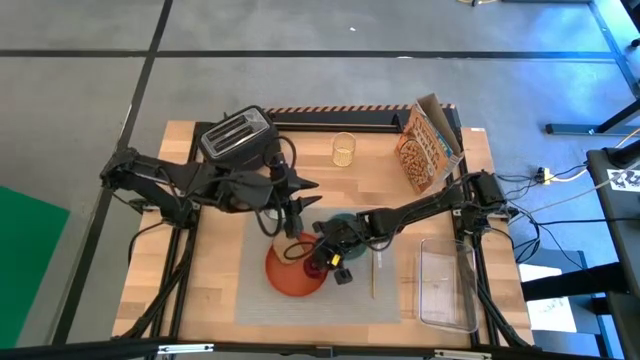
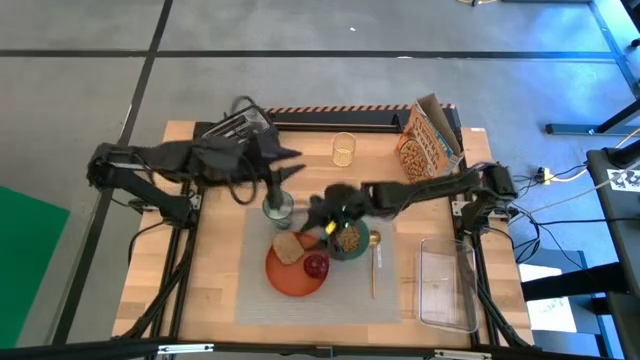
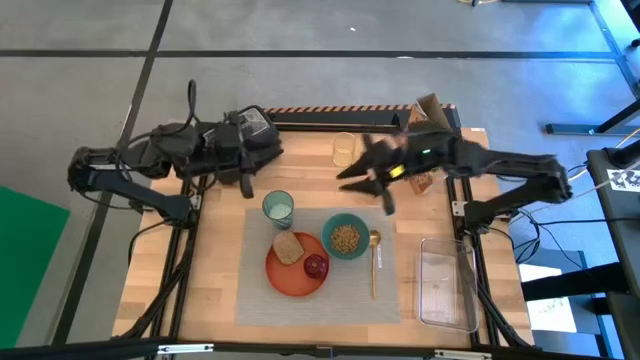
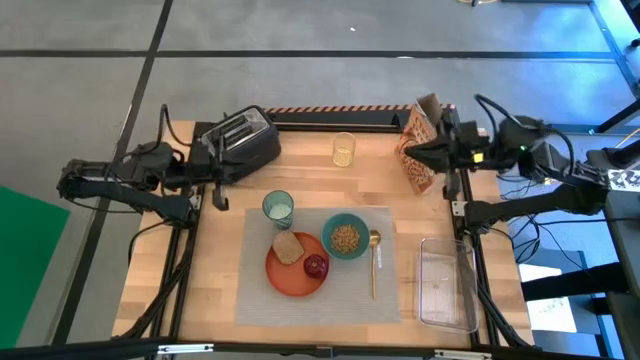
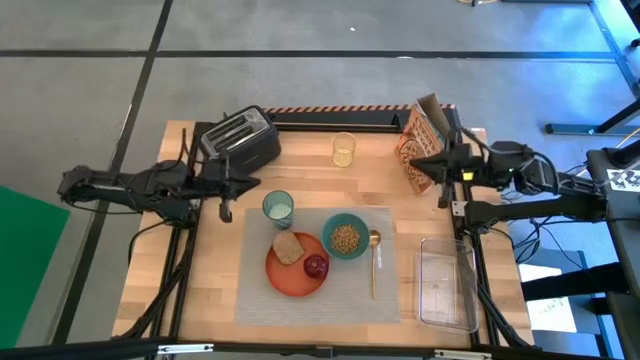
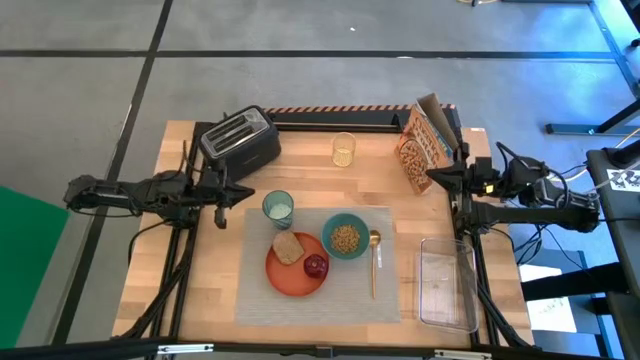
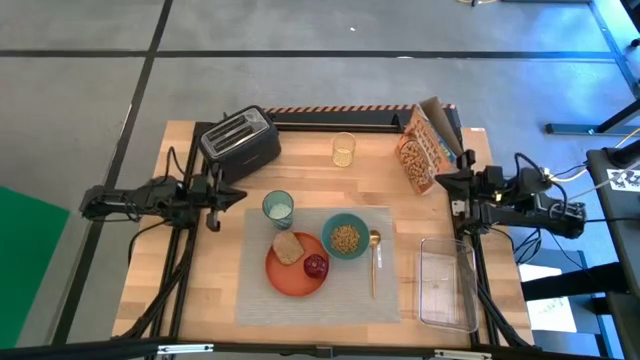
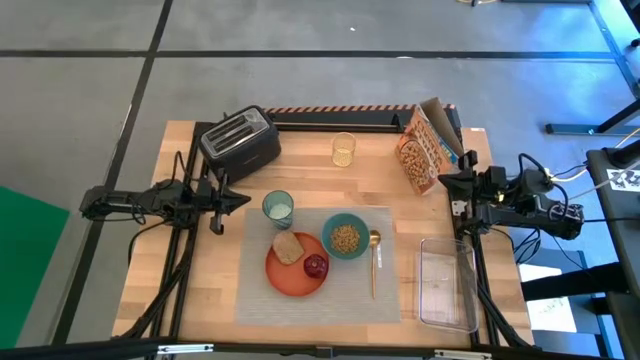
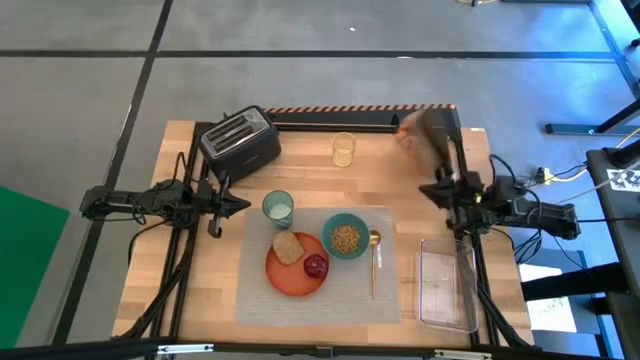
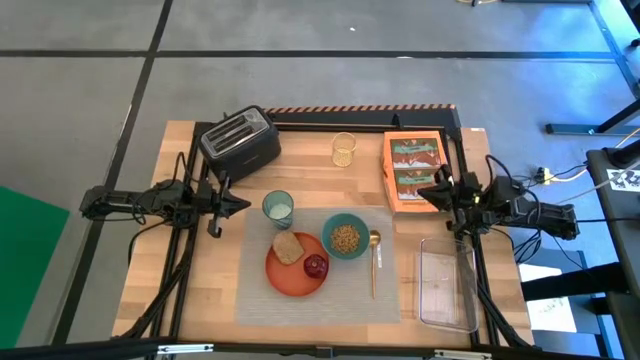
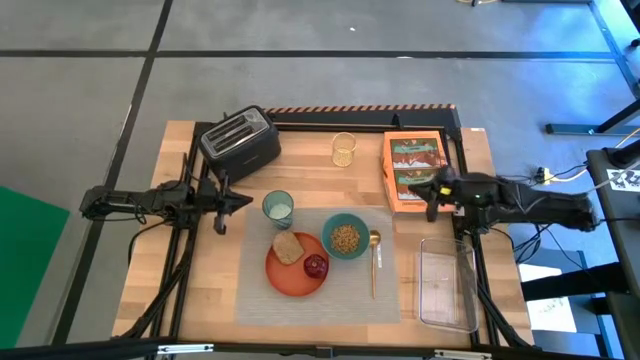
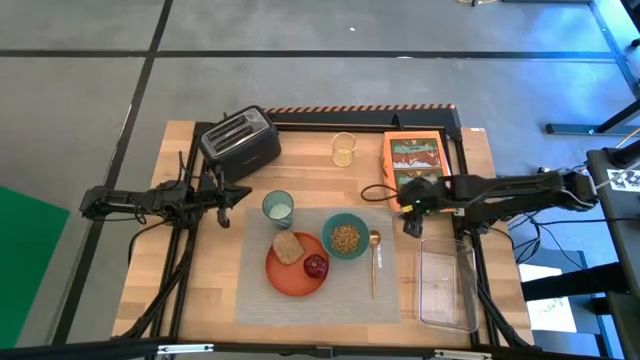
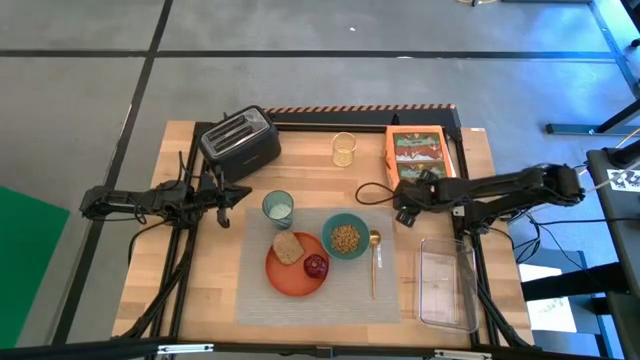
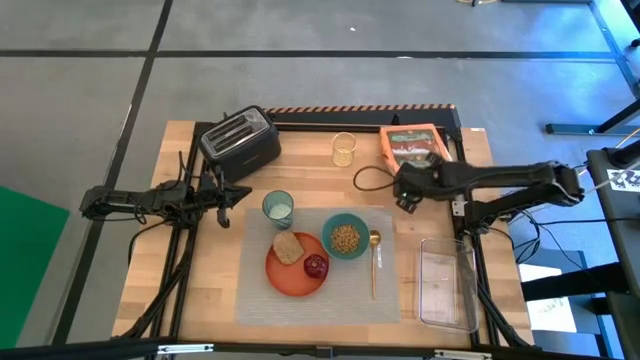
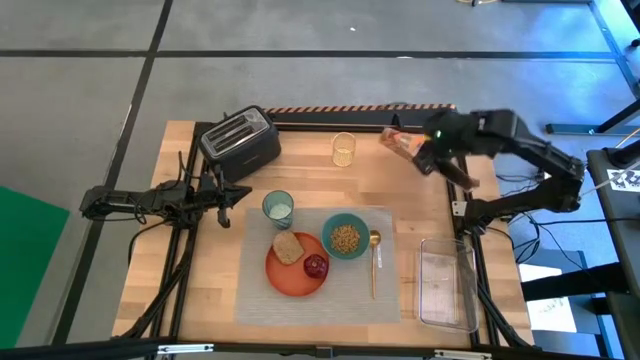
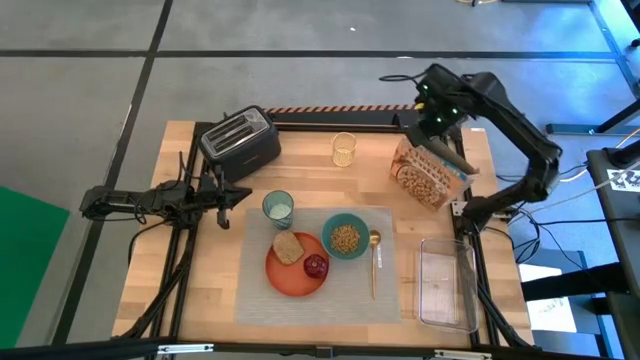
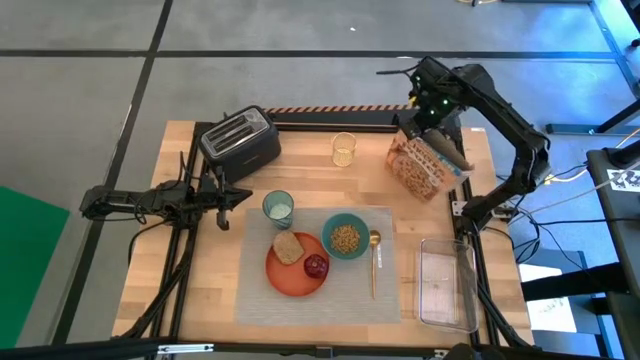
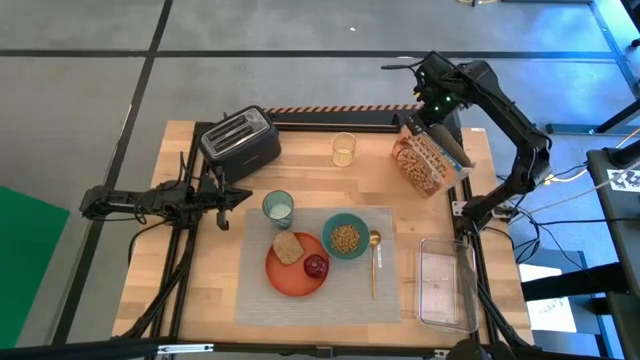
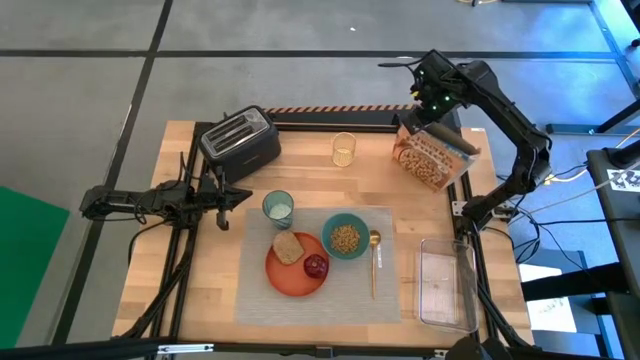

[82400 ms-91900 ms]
Task: Arrange a breakfast setting
Adjust the cereal in the table

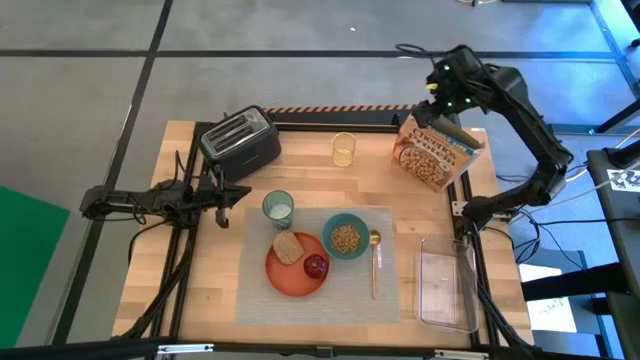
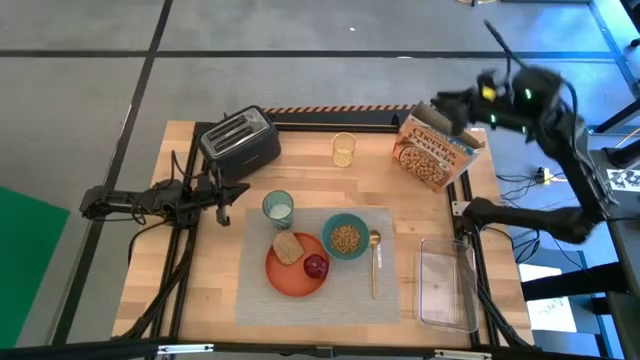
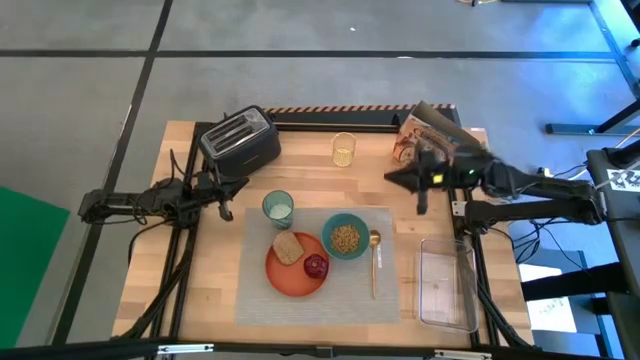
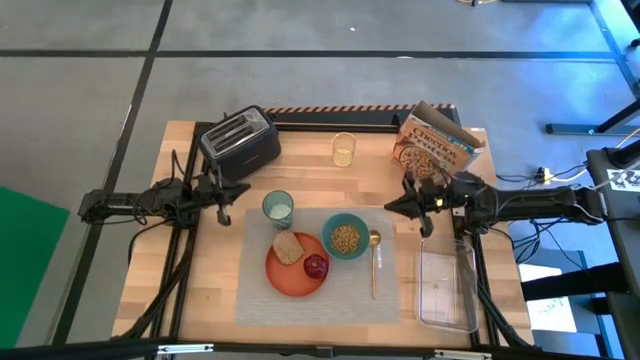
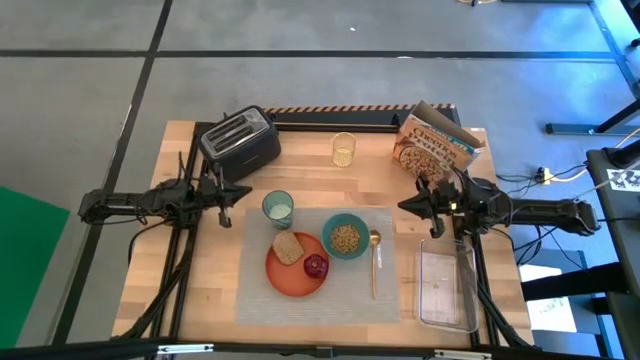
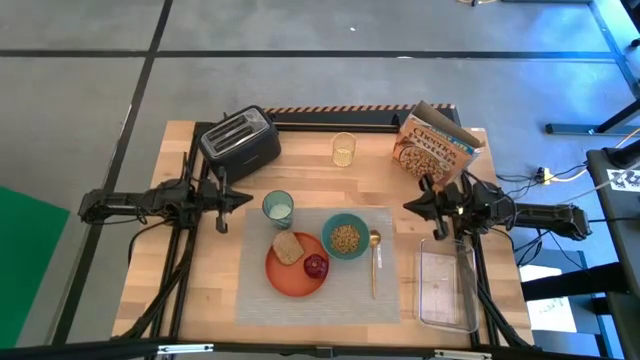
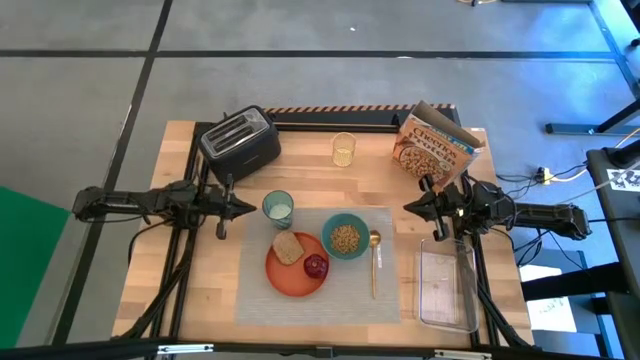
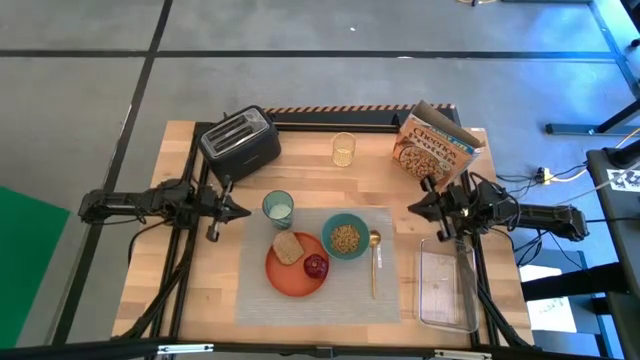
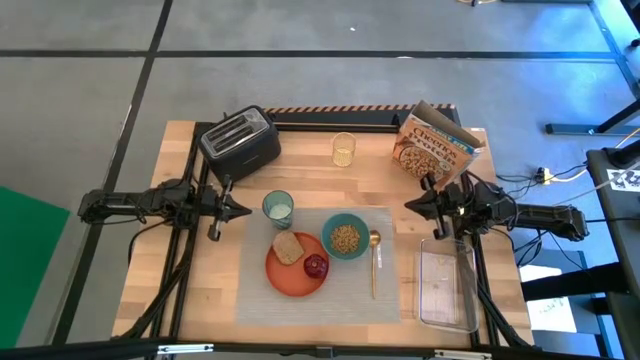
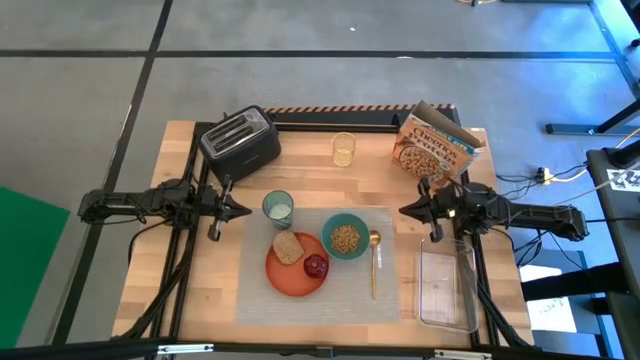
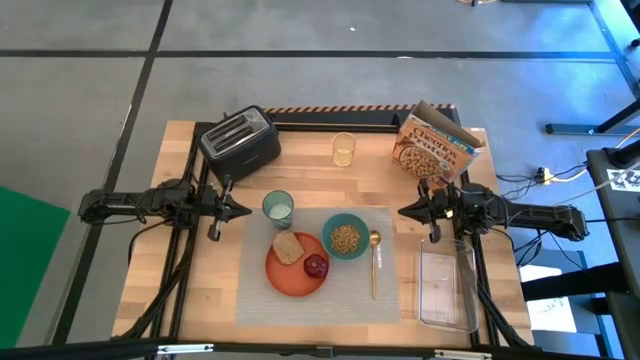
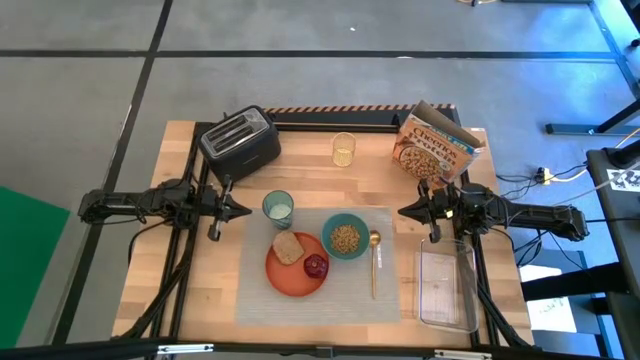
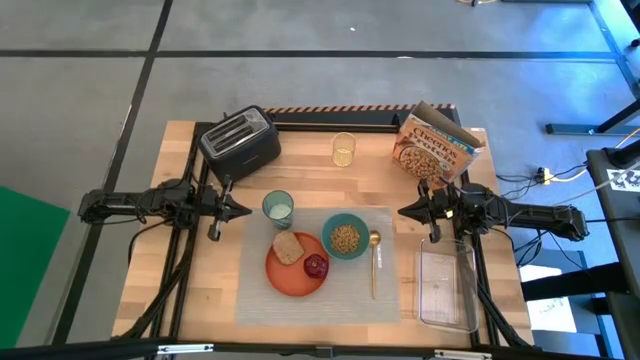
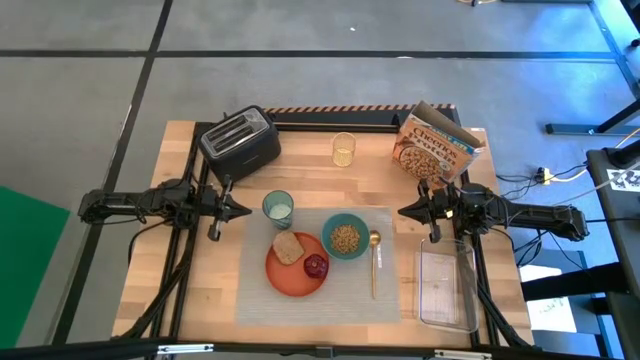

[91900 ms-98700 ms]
Return to Home Position

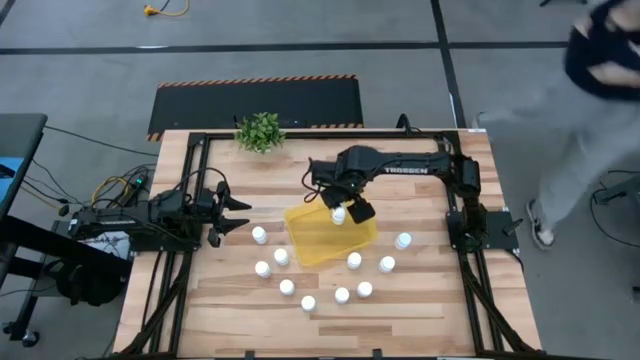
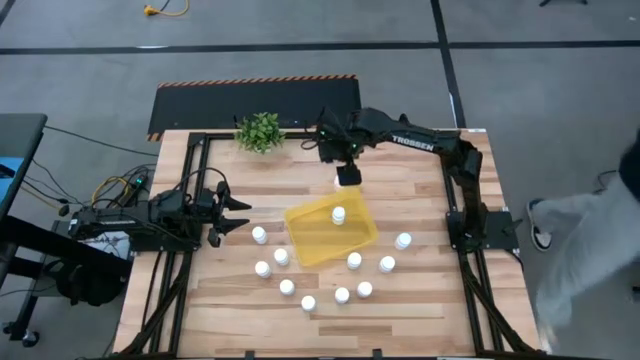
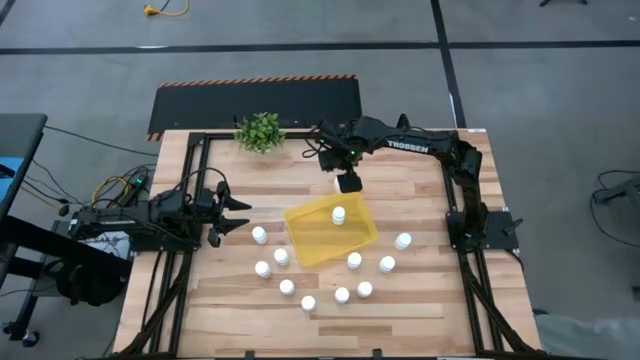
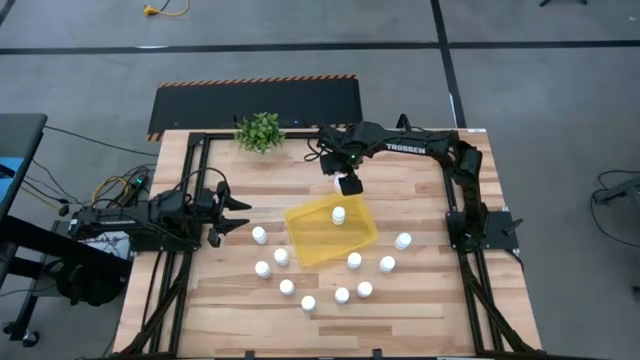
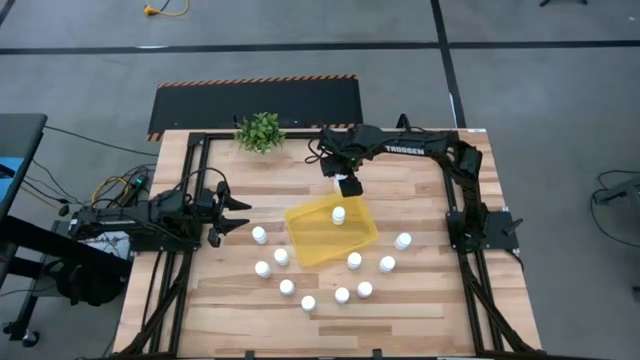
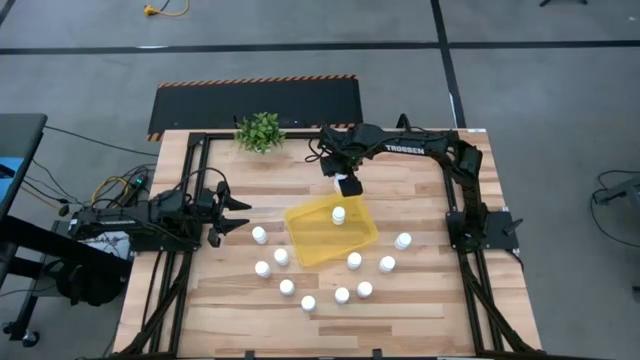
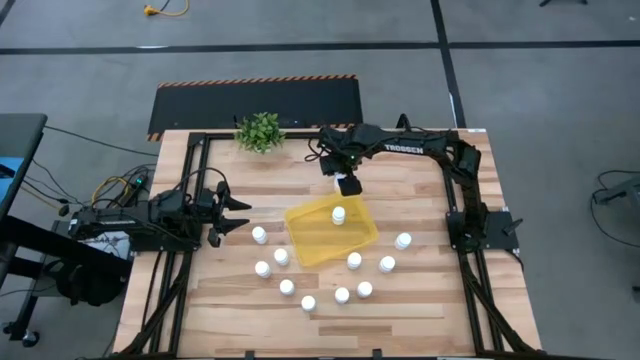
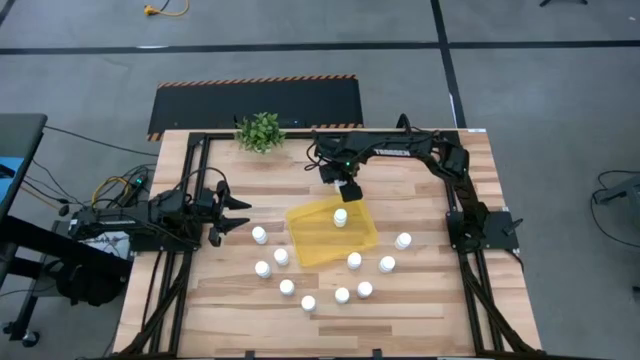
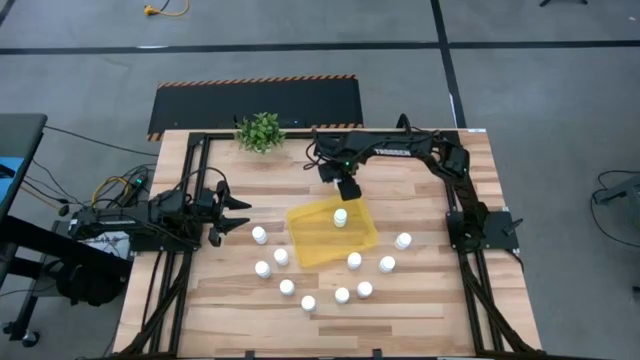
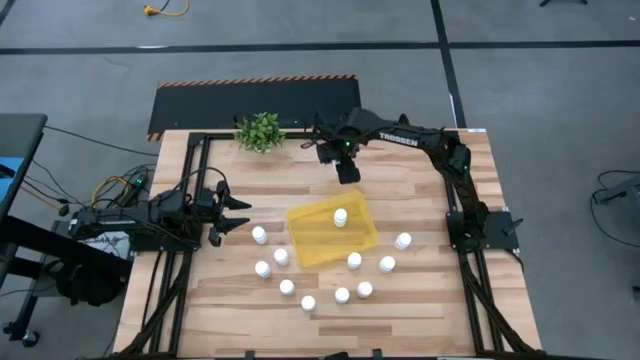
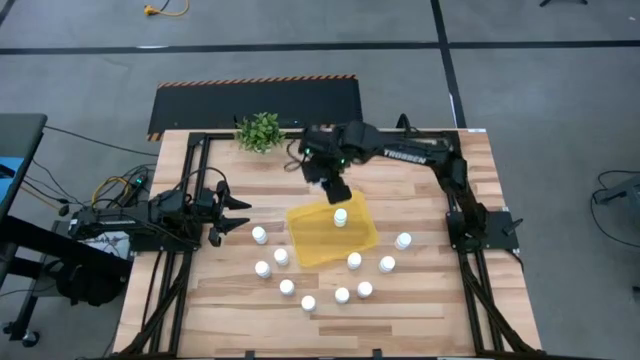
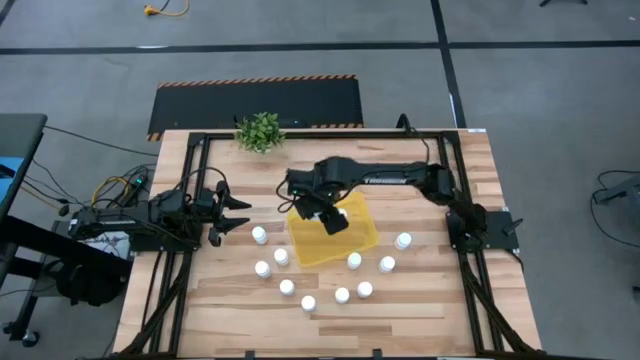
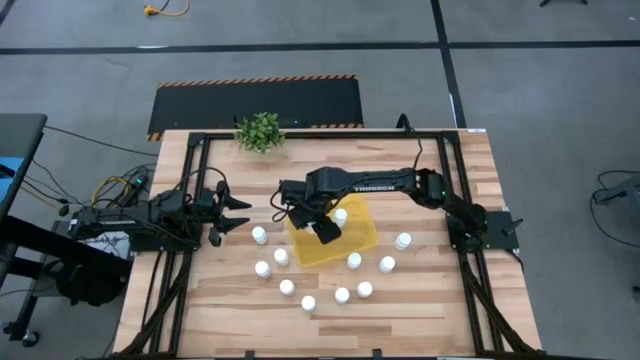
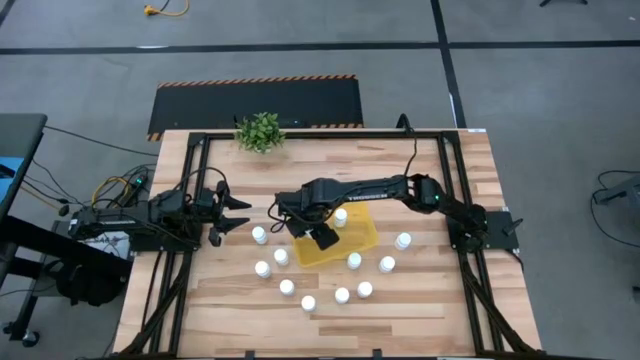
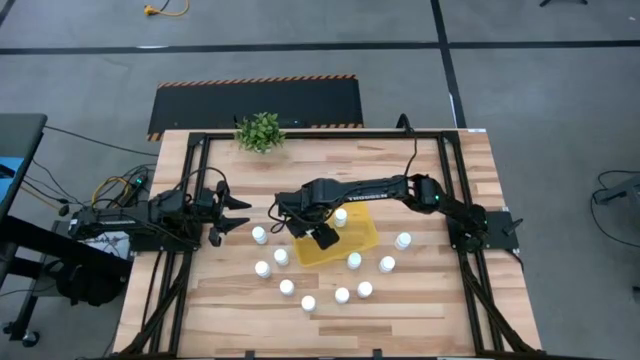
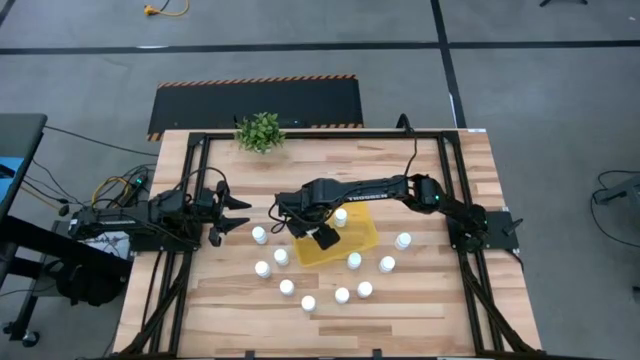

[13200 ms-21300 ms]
Task: Pick and place pill bottles into a basket
Put the white pill bottle into the yellow bin
